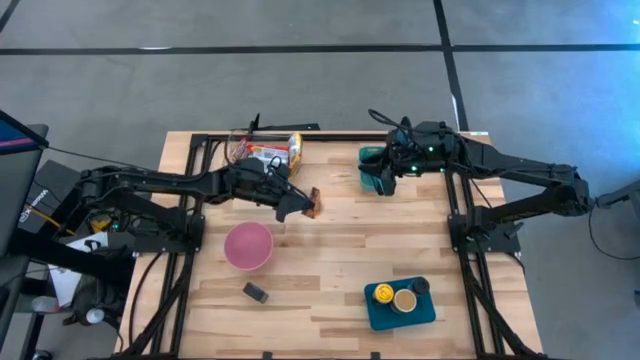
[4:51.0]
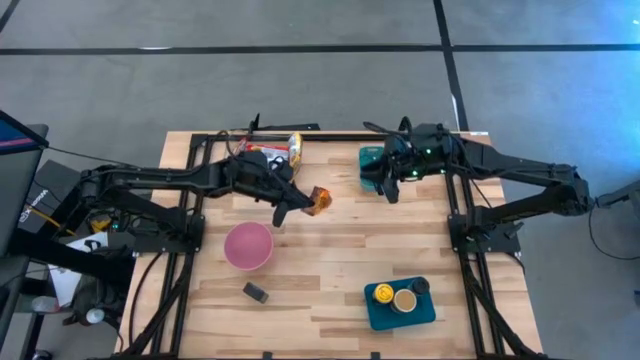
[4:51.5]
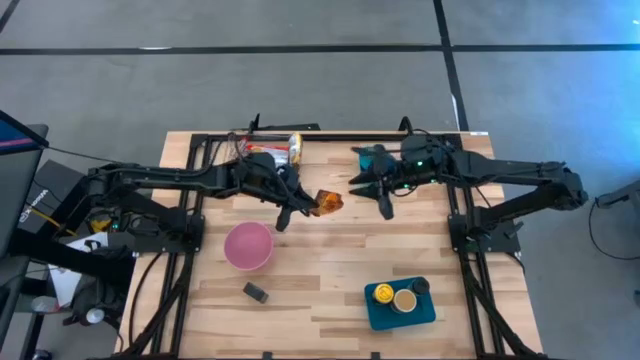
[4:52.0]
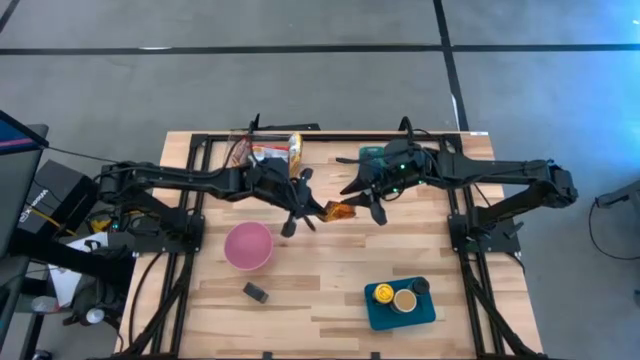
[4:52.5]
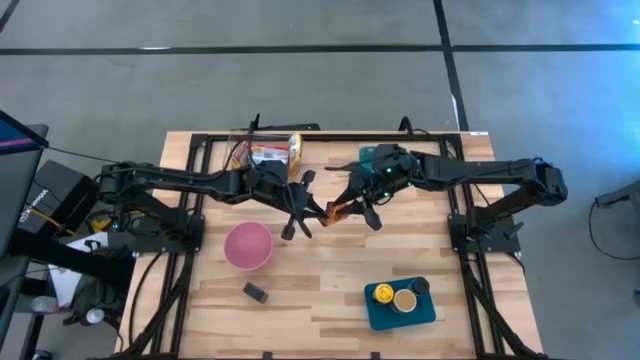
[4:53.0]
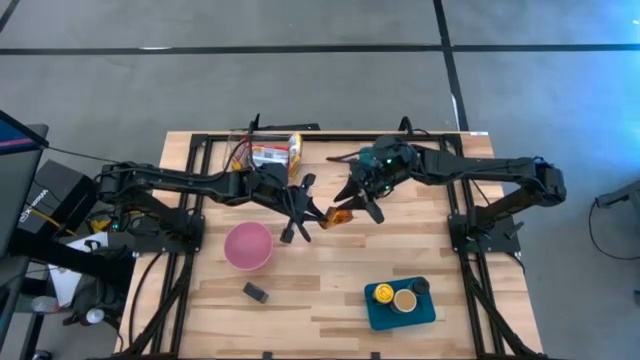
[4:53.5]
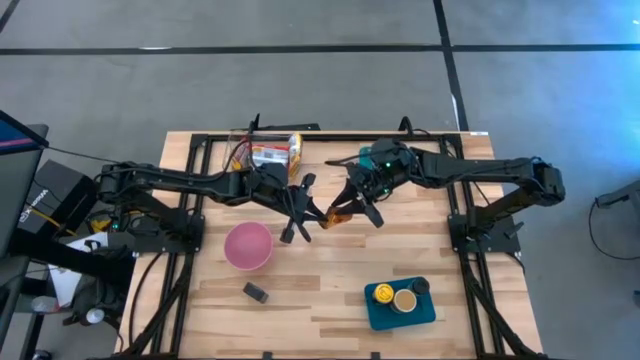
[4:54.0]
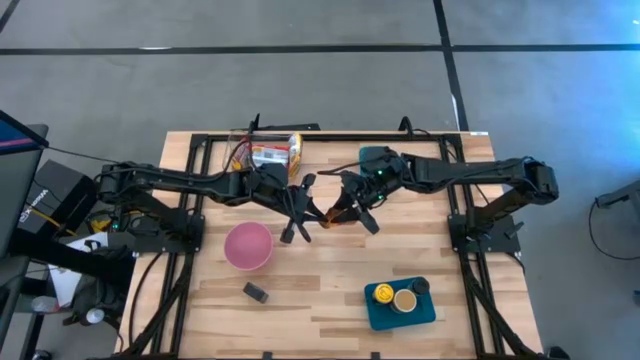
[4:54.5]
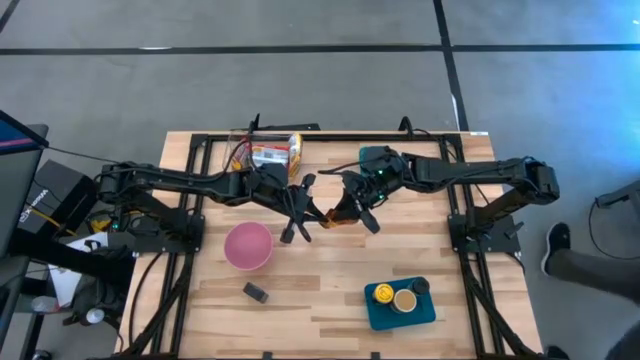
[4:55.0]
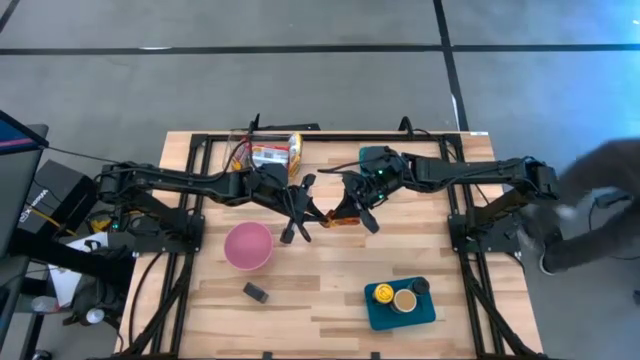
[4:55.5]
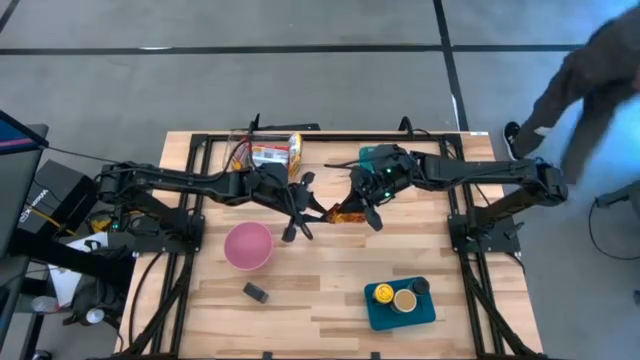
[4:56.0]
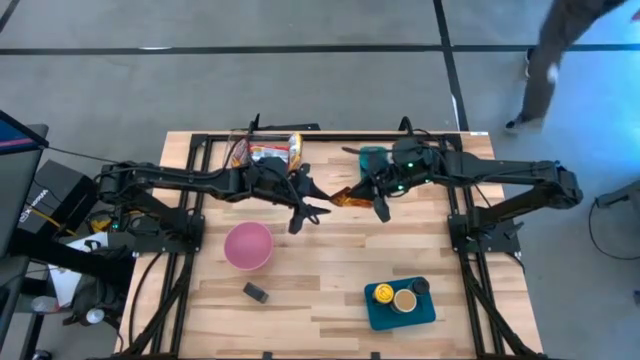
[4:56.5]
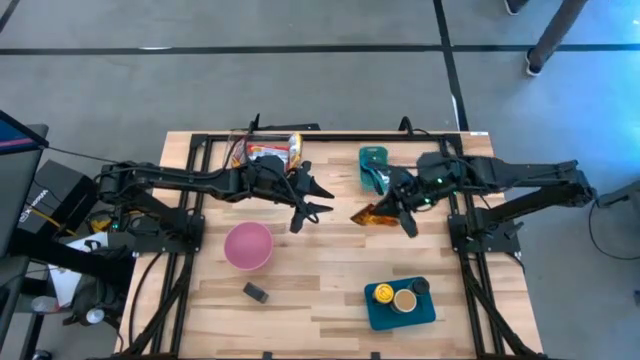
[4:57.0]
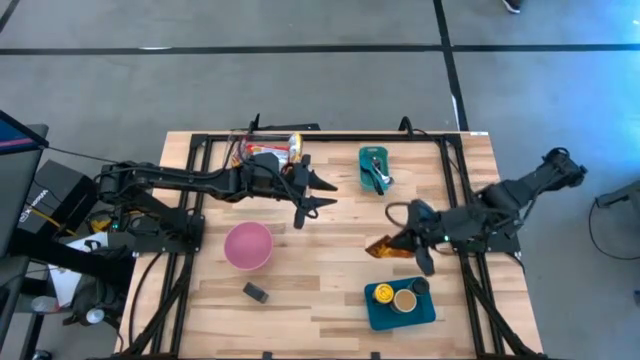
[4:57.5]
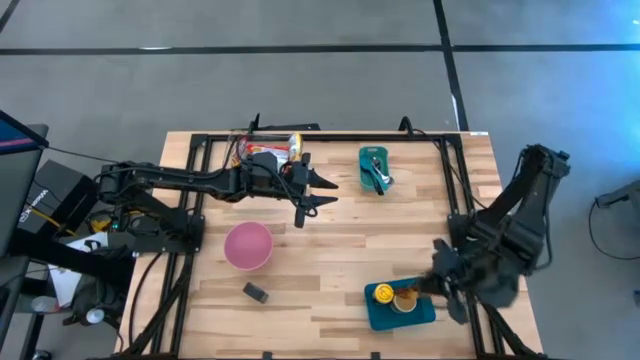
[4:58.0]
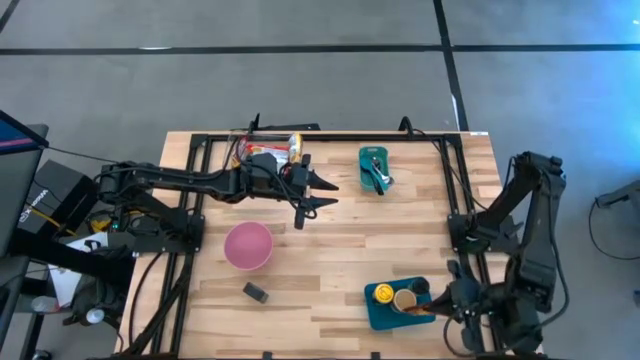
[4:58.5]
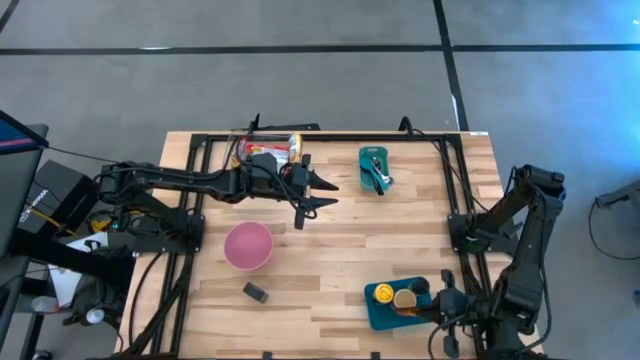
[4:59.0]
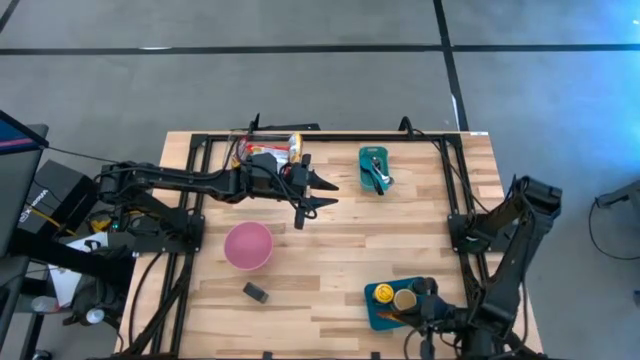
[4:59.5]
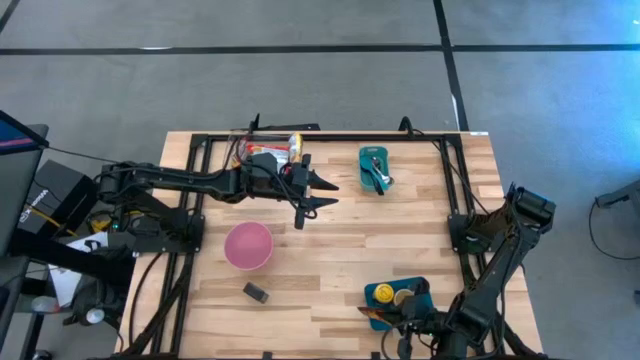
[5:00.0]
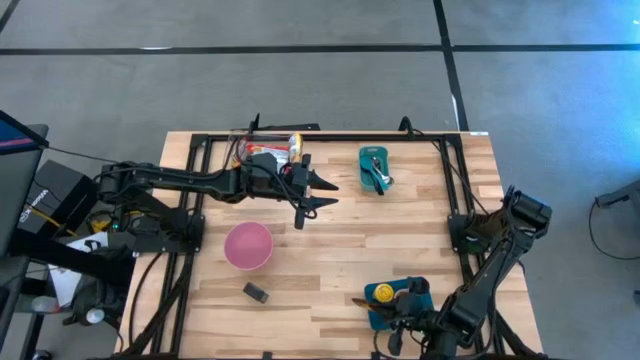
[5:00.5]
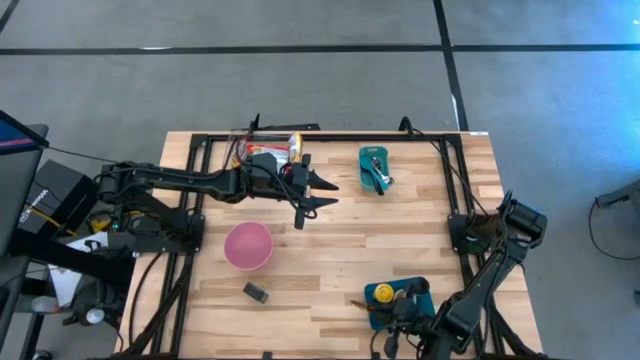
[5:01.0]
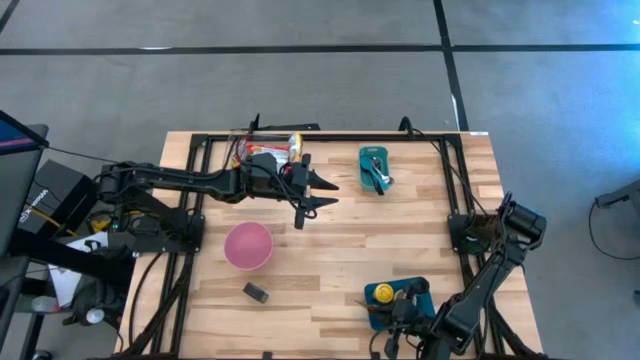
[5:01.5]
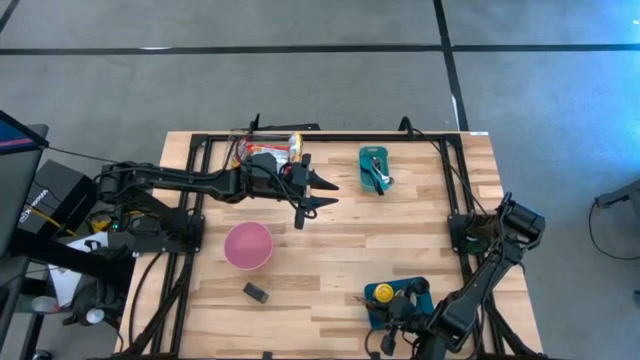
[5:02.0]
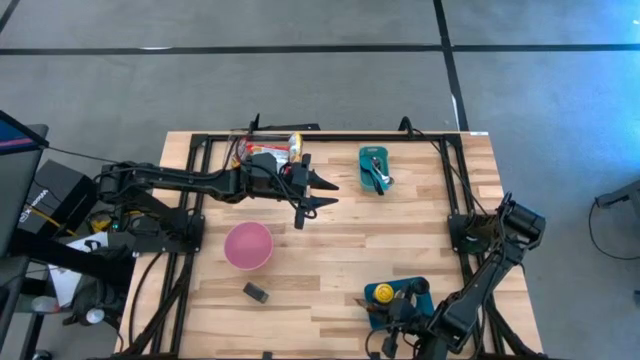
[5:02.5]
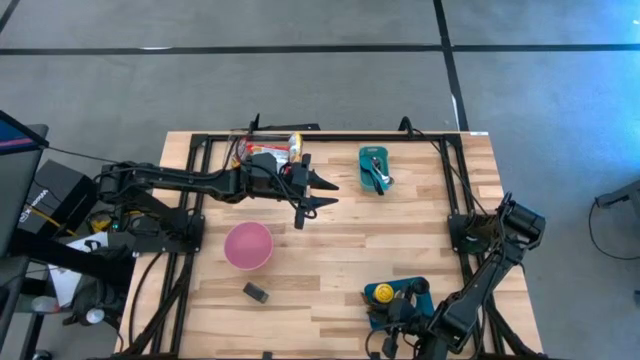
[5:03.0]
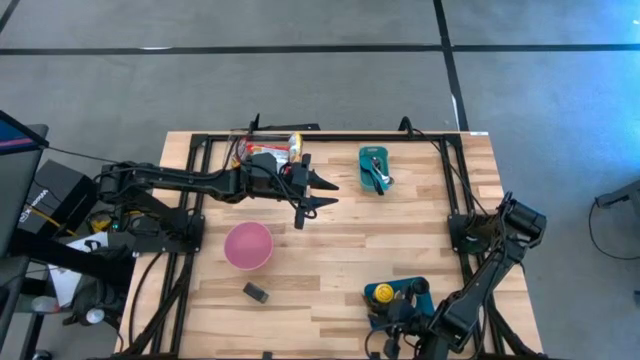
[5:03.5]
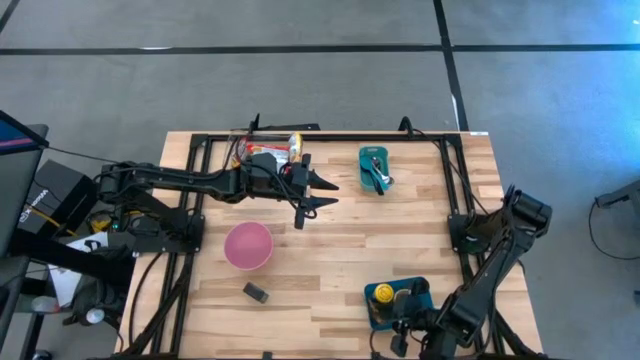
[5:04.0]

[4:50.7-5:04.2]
Task: Pick & Place Food Item
Put the orange seasoning pack into the blue bin

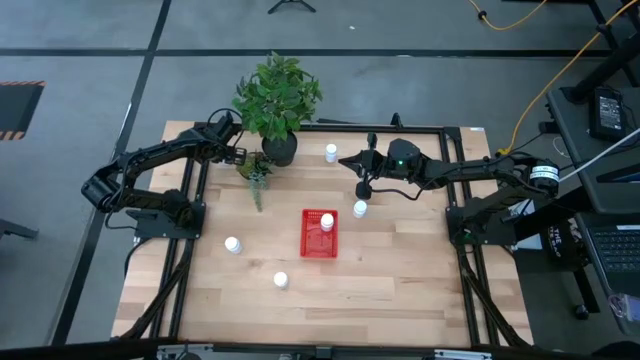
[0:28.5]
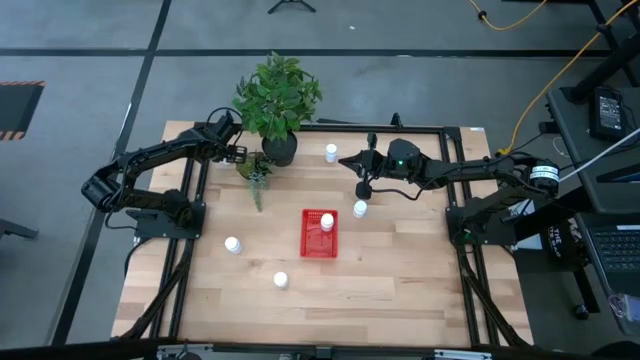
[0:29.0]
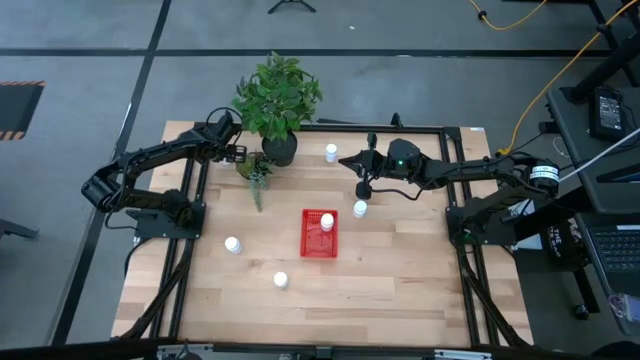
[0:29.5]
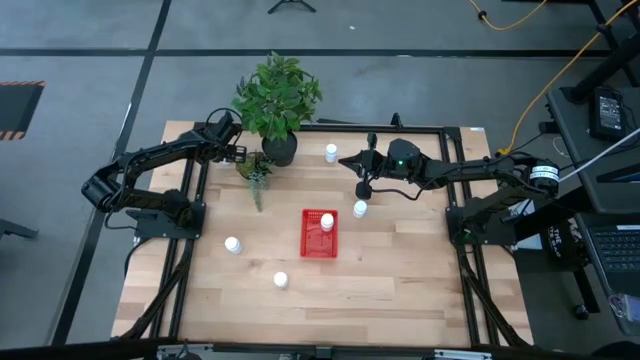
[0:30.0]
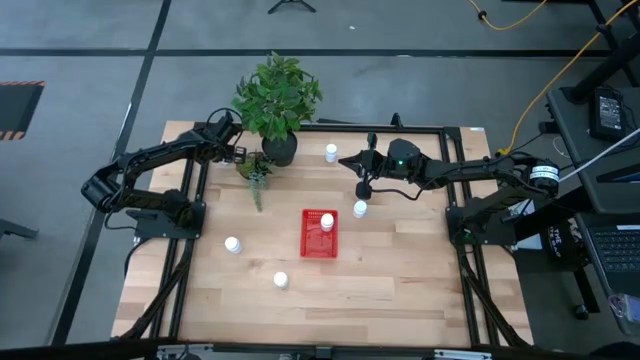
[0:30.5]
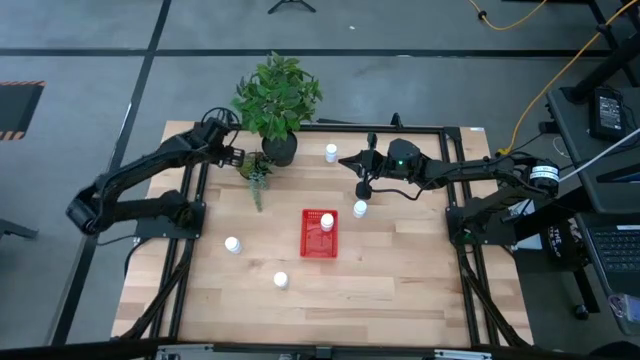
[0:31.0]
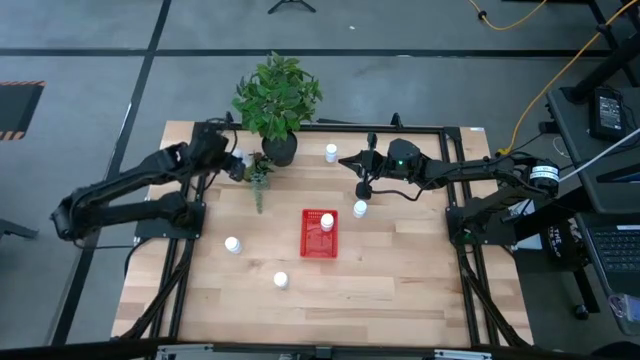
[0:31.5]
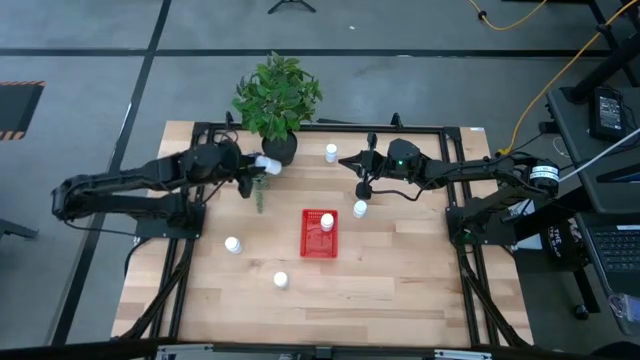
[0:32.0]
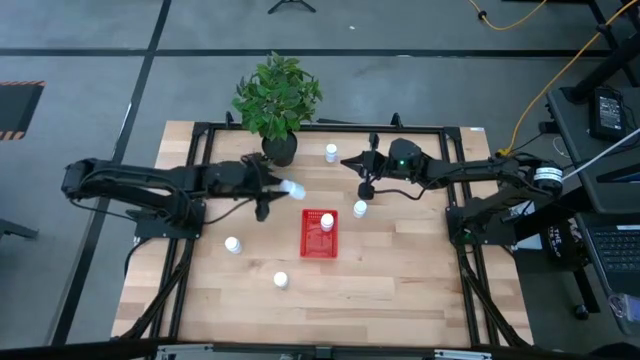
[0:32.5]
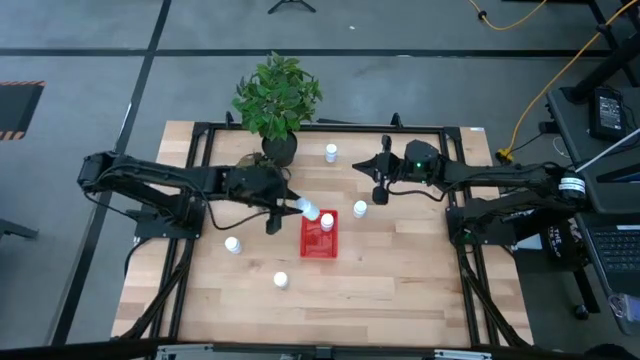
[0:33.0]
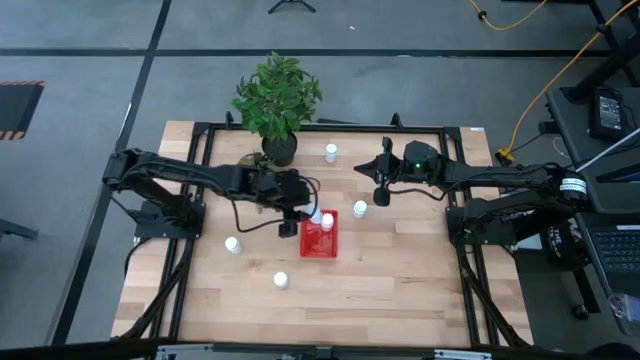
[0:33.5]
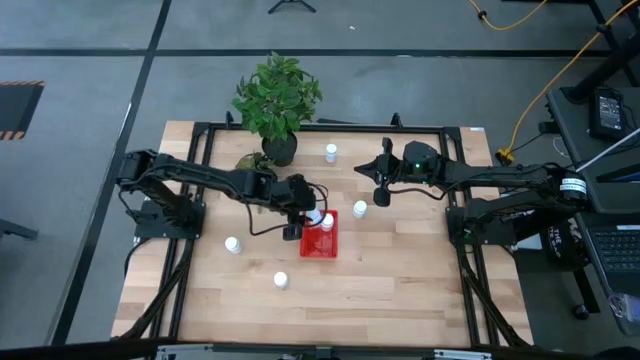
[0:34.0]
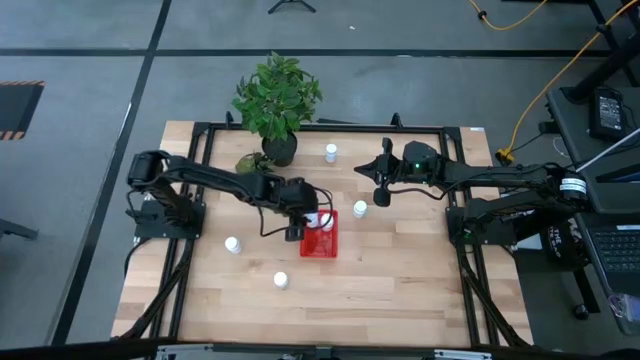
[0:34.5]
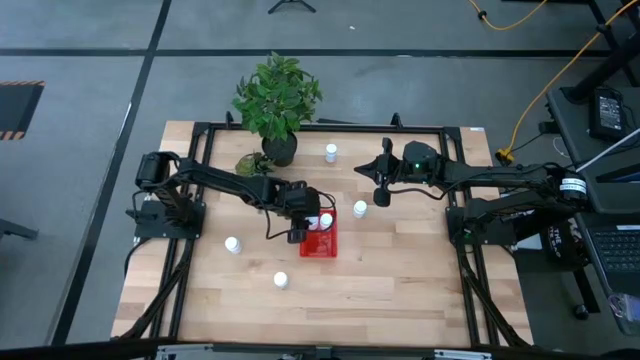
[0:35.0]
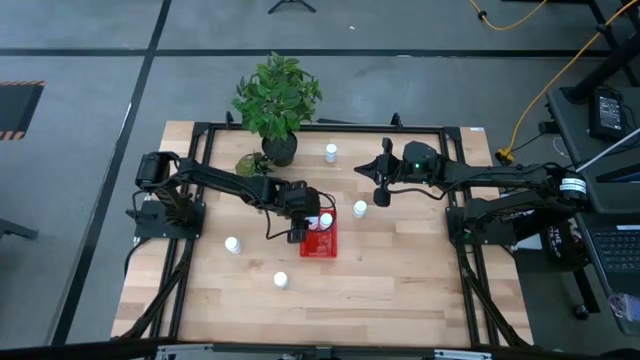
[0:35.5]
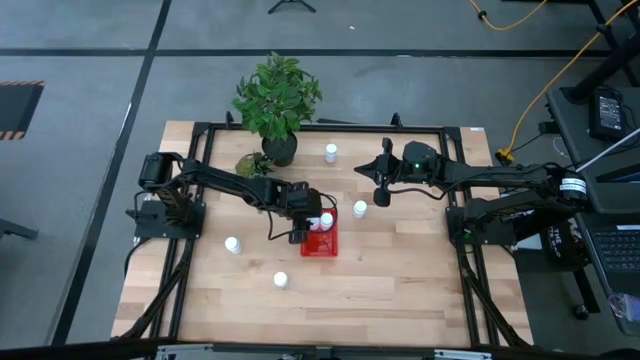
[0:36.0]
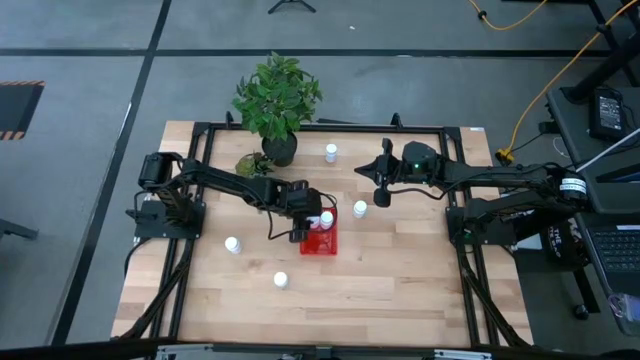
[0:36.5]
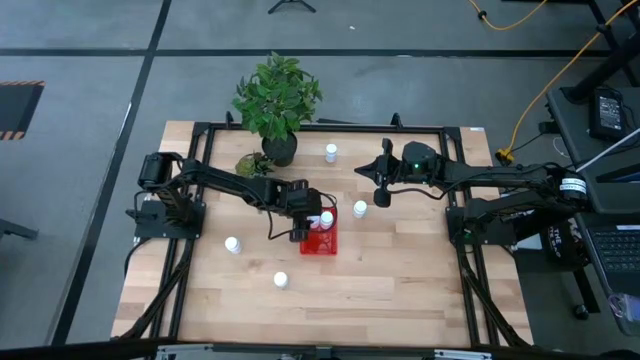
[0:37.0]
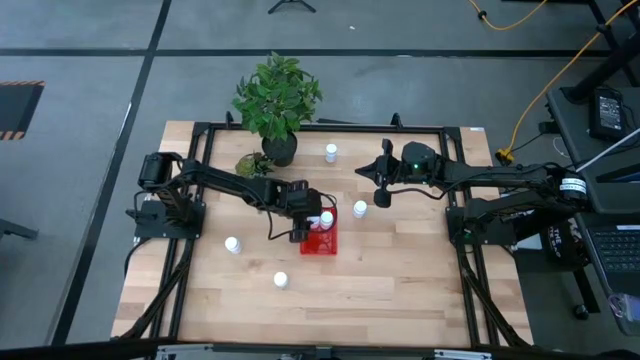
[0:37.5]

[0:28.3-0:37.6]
Task: Pick and place pill bottles into a basket
Put the white medicine bottle into the red bin
